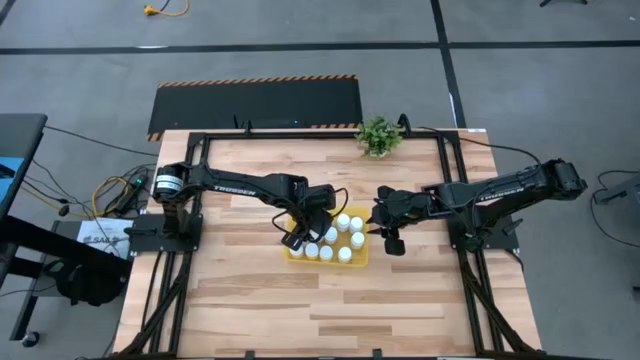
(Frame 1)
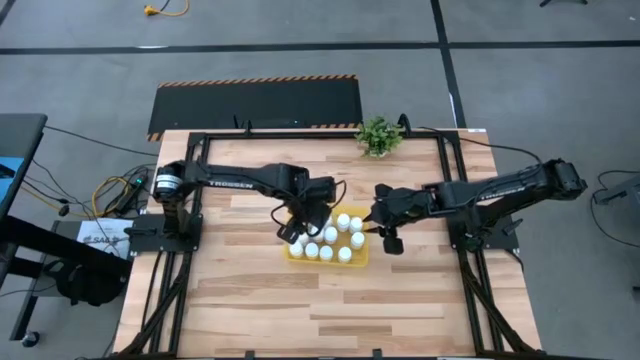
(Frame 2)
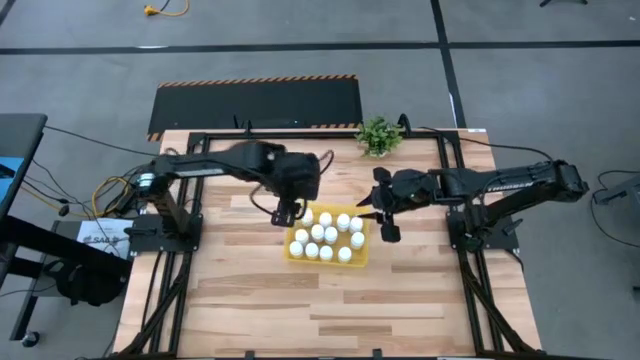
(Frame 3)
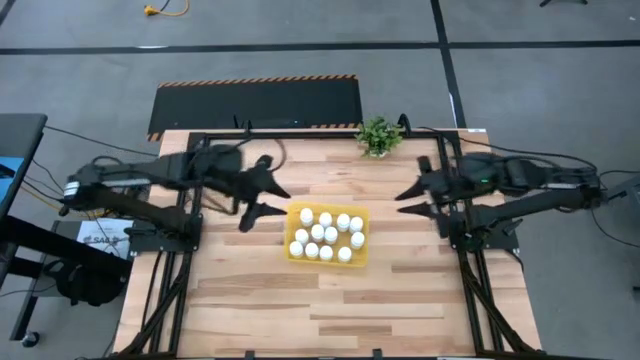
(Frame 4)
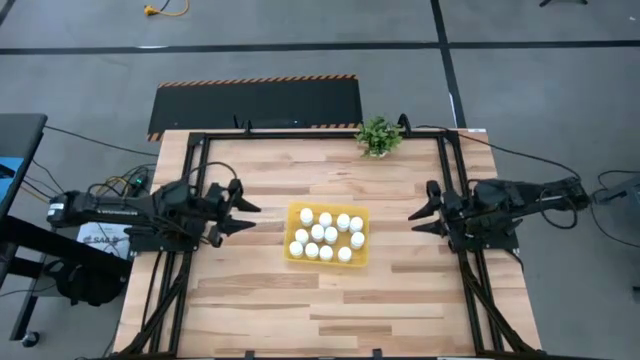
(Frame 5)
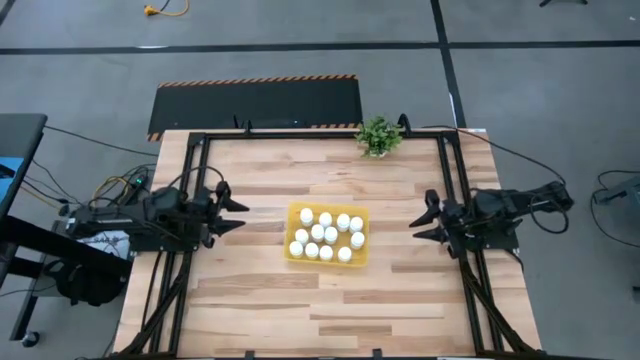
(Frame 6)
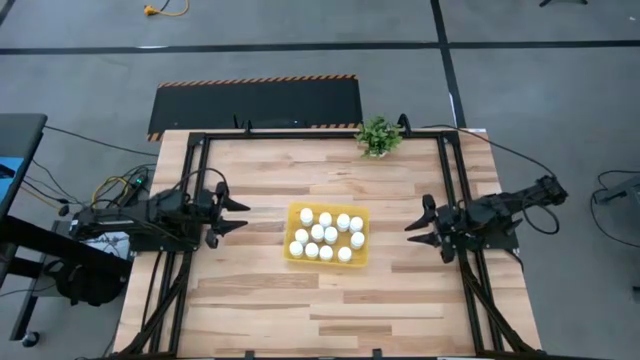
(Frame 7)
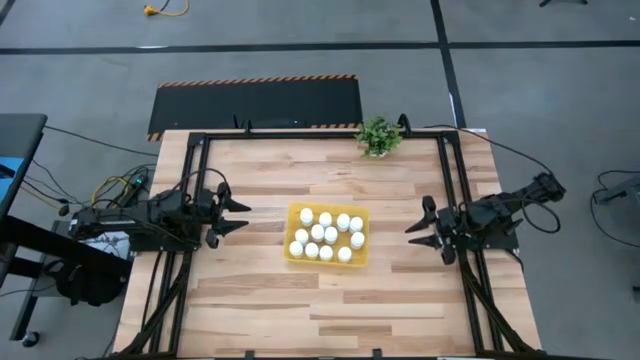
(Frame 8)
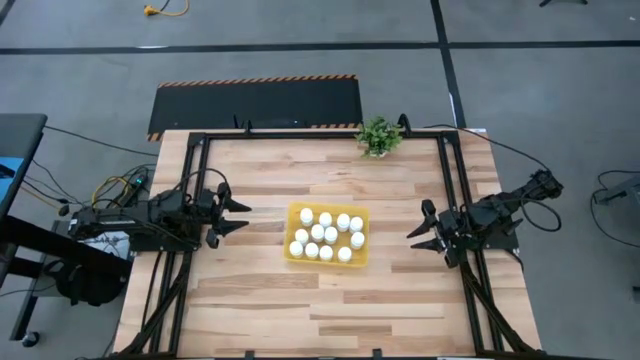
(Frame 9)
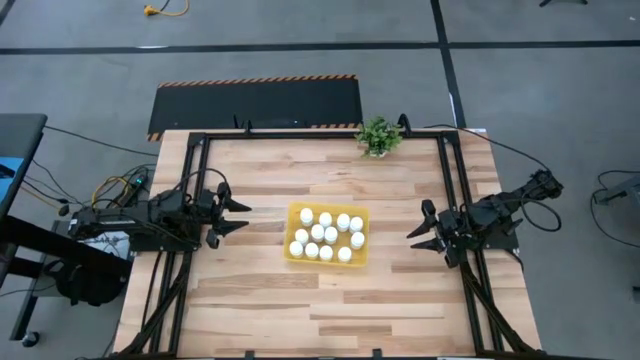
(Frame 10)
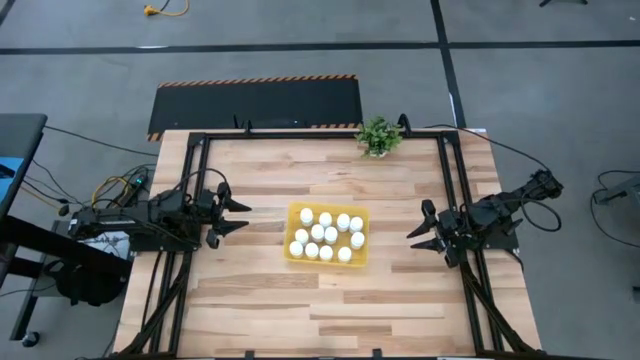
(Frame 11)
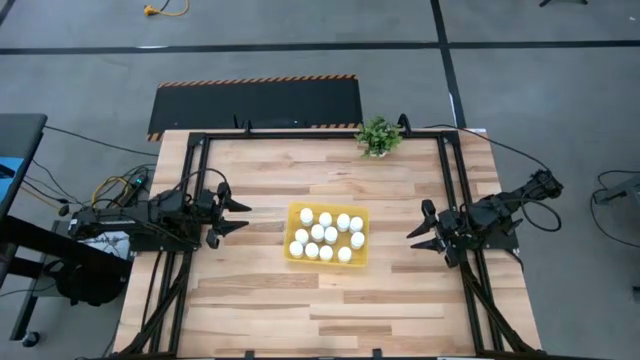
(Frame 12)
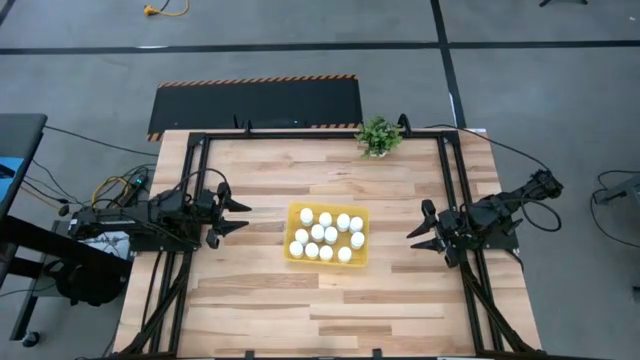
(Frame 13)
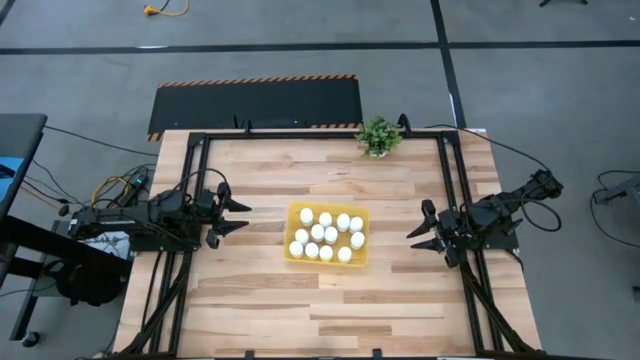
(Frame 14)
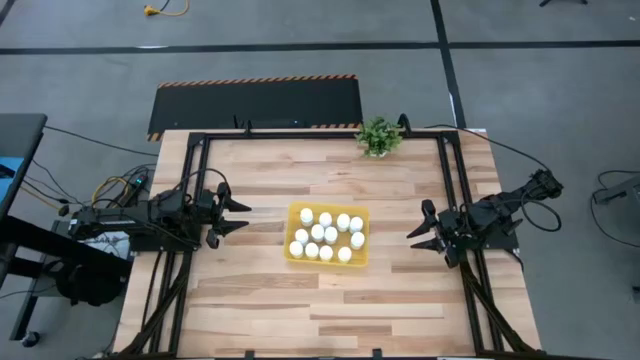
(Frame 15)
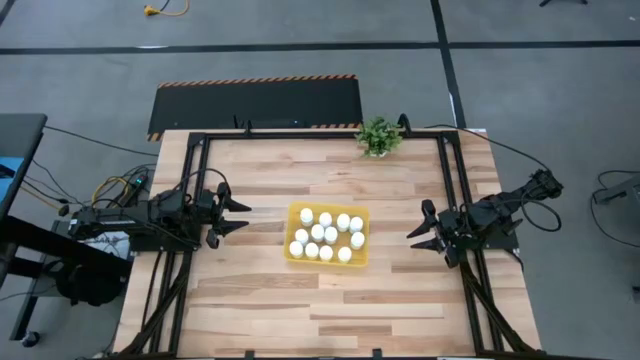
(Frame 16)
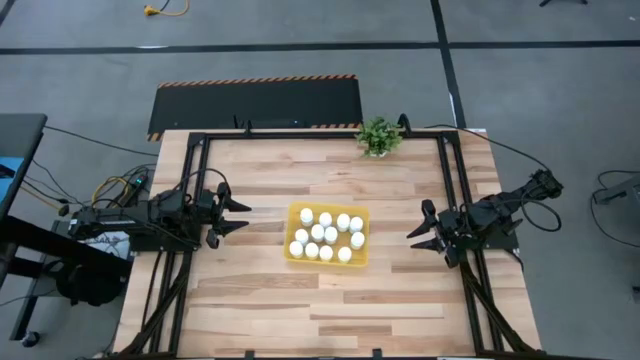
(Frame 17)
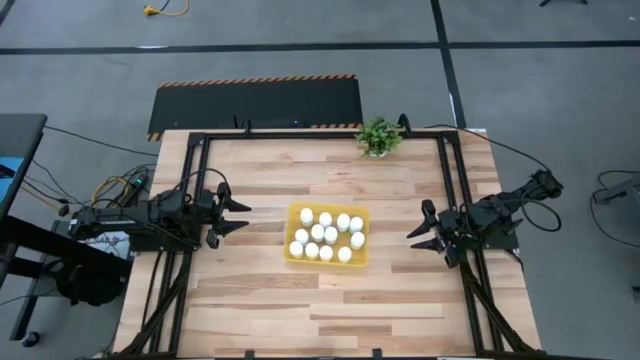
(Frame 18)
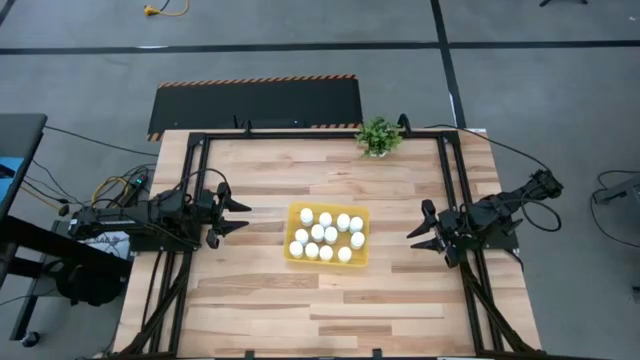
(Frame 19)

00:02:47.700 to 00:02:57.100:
Task: Pick and place pill bottles into a basket
Return to home position

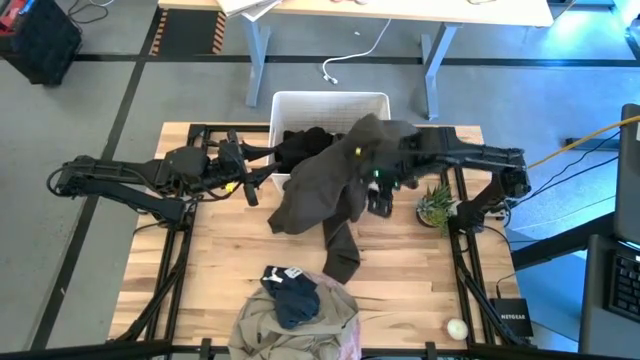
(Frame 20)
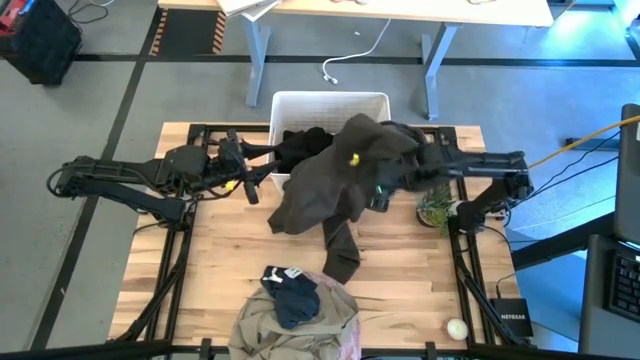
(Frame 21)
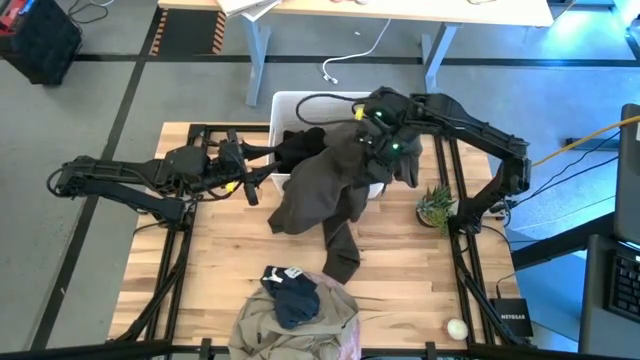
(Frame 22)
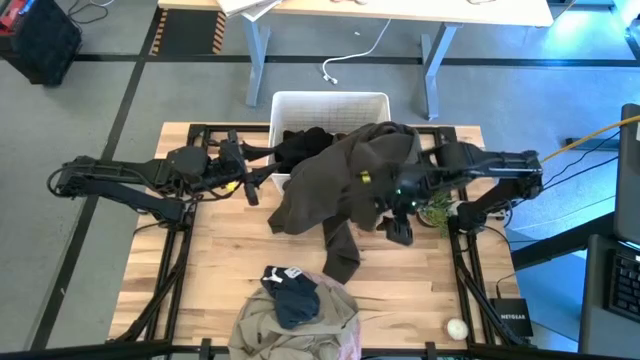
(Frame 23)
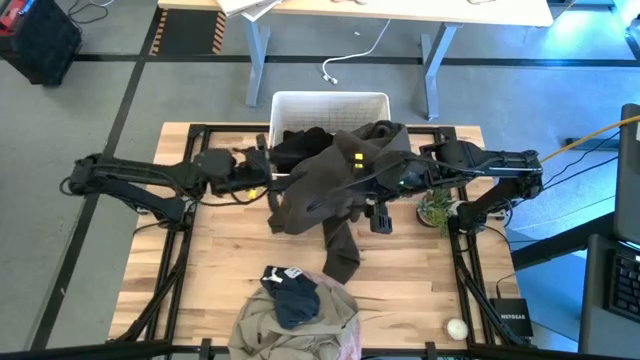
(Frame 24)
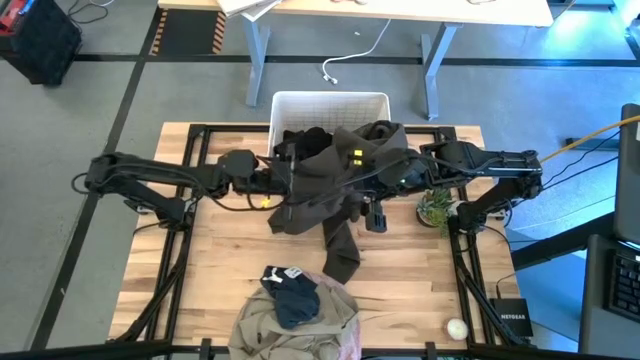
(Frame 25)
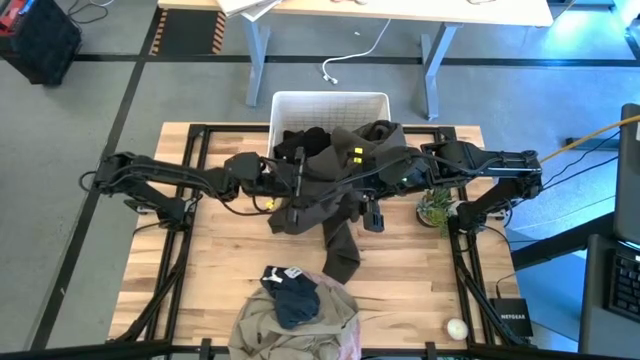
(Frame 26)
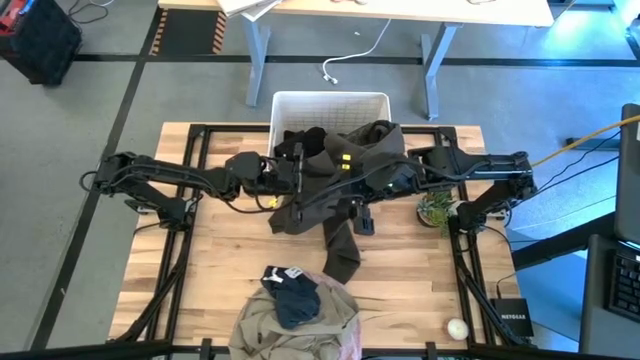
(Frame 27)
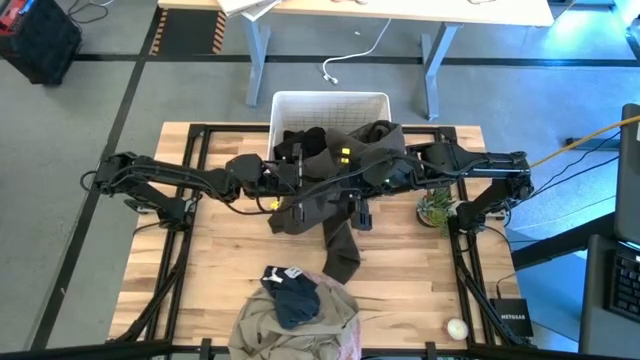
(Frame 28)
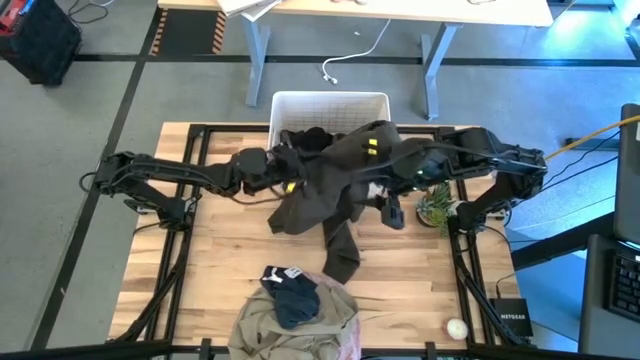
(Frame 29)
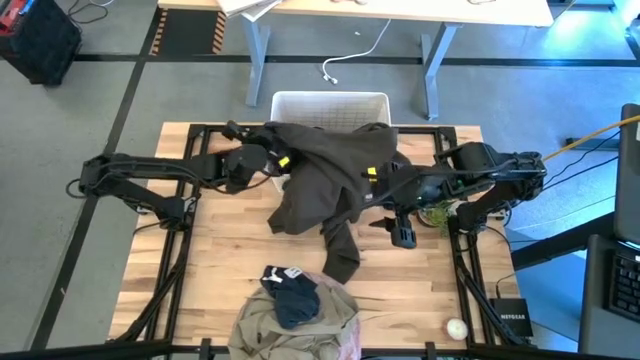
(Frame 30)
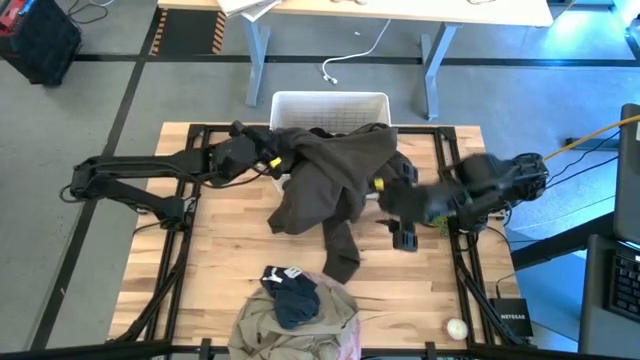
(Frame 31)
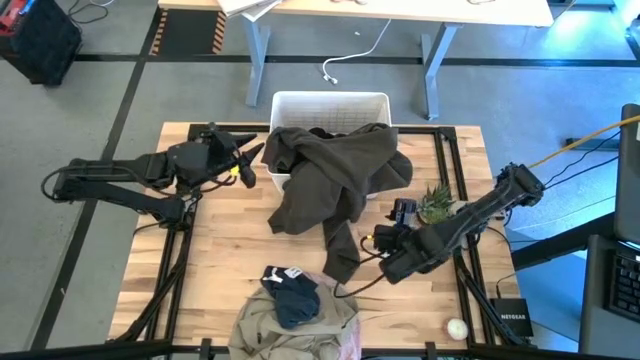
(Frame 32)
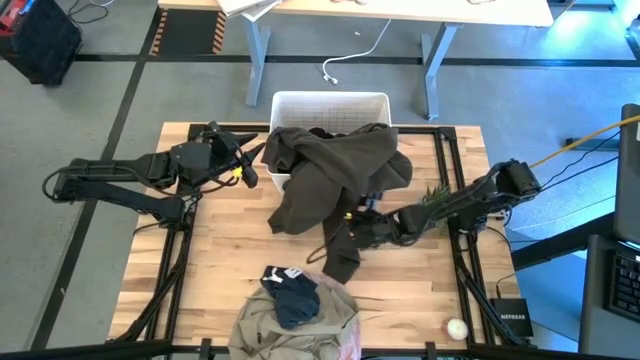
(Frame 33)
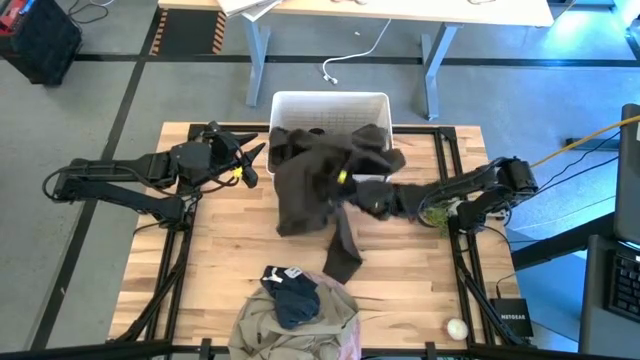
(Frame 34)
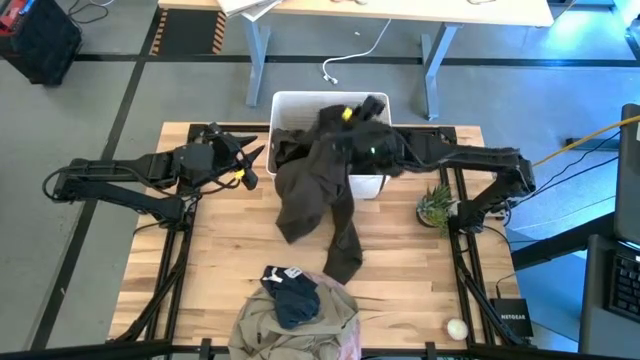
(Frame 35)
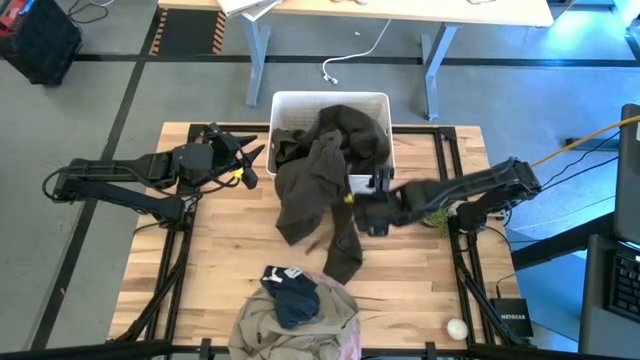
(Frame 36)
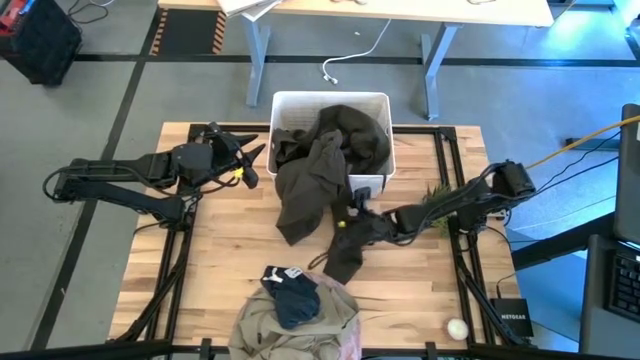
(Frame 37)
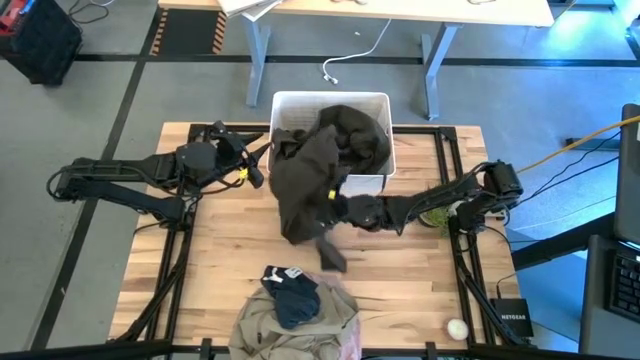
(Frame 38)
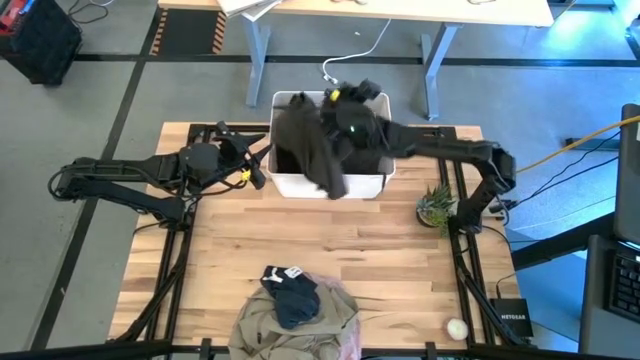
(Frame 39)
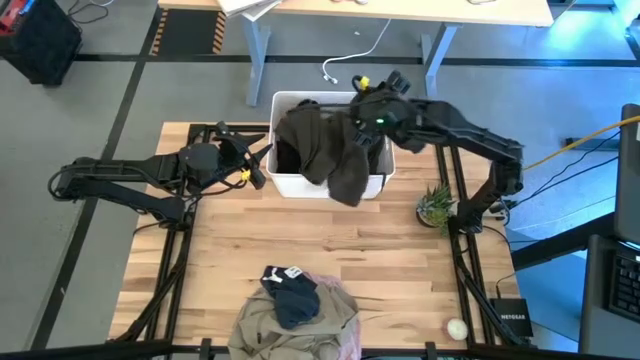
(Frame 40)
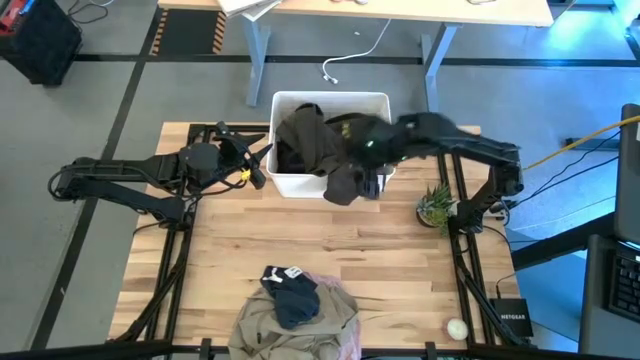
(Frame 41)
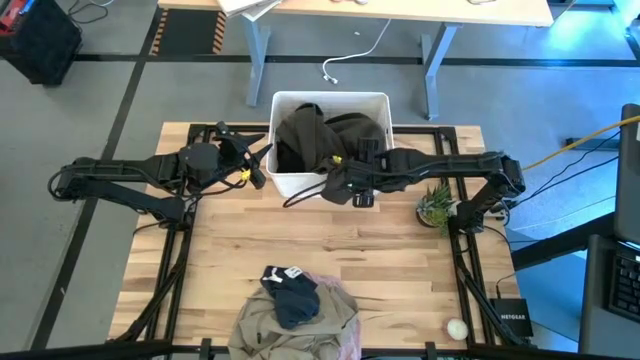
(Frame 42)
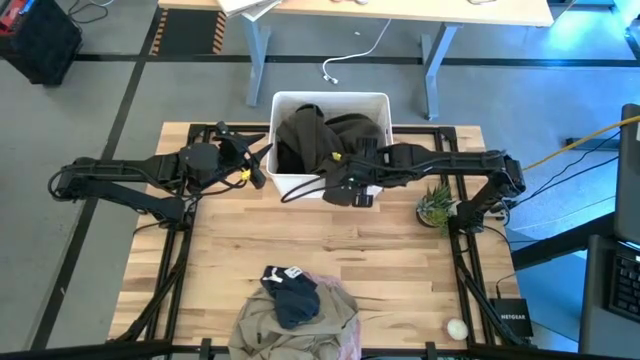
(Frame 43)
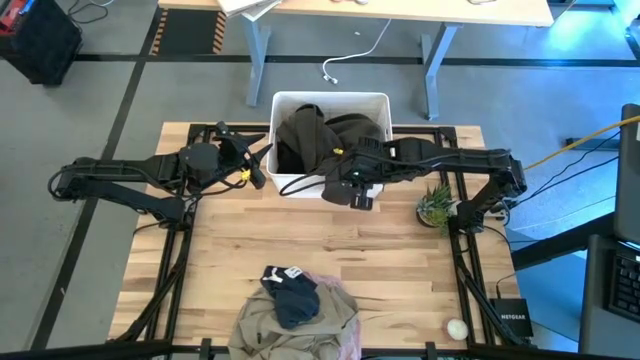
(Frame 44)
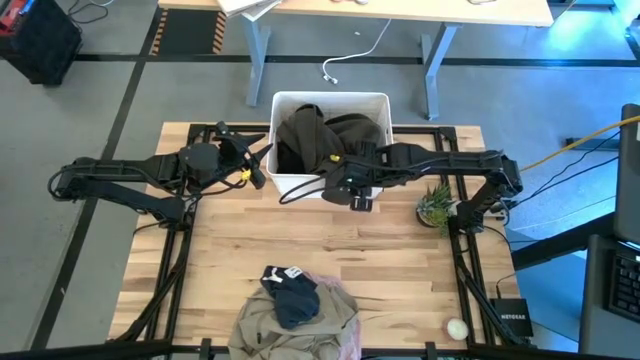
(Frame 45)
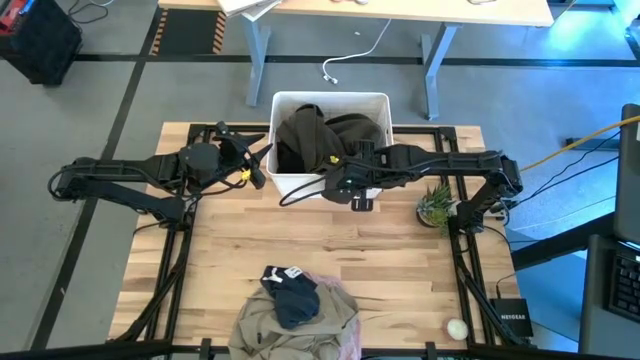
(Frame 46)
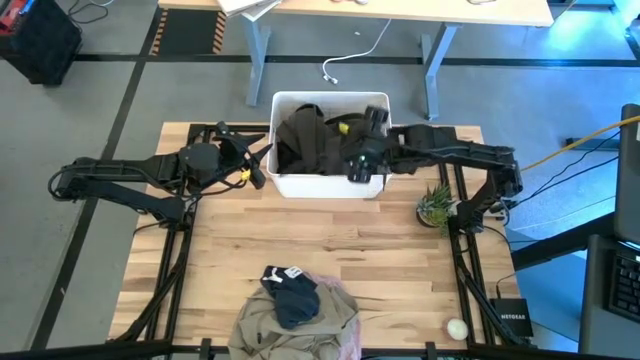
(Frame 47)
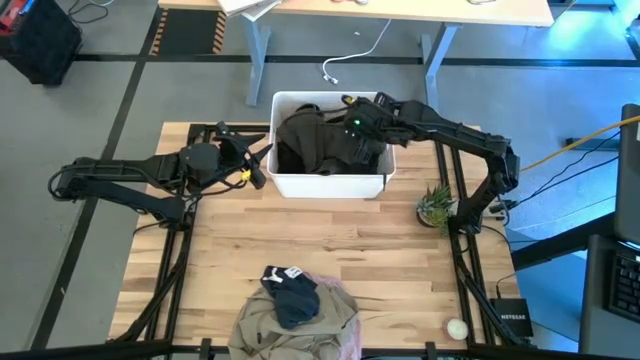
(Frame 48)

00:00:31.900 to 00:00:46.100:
Task: Sort clothes
Put the brown jacket into the white bin
